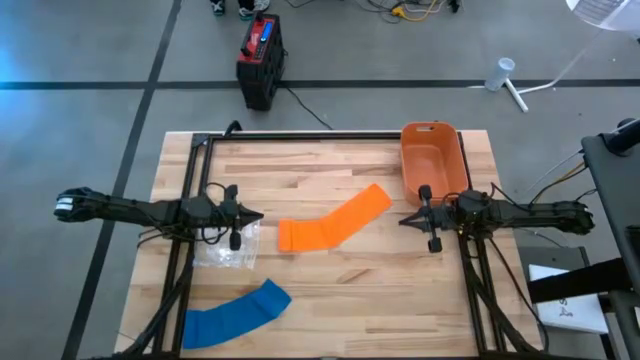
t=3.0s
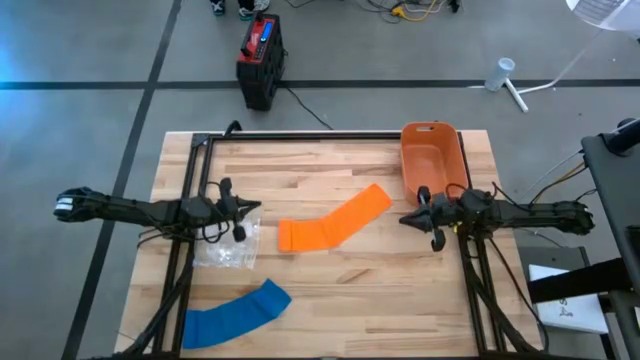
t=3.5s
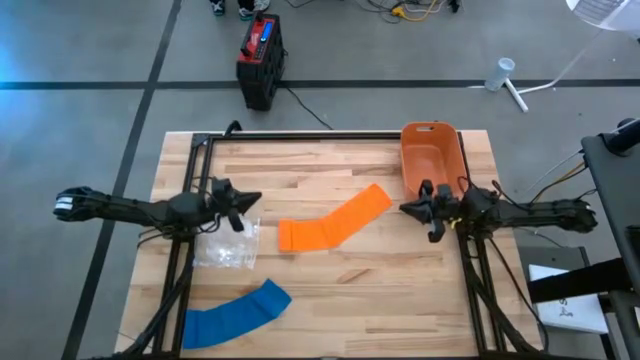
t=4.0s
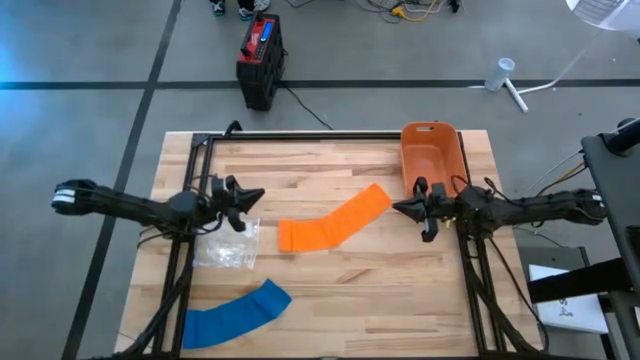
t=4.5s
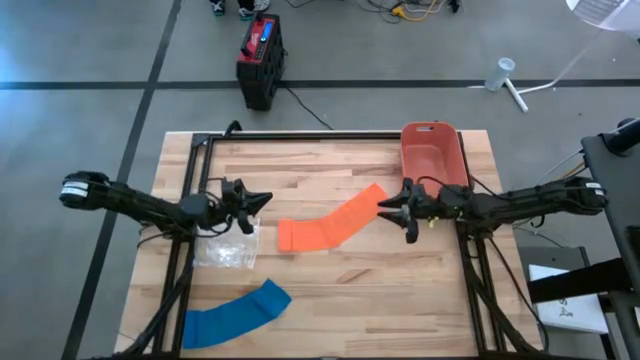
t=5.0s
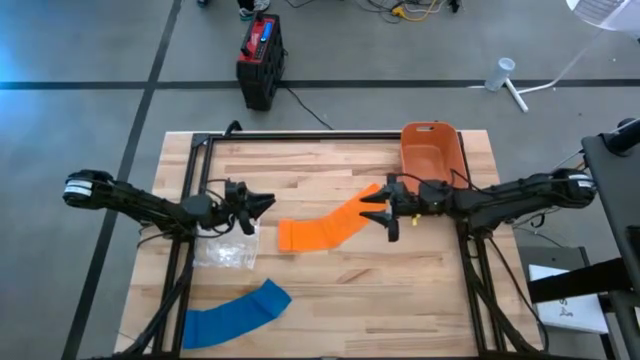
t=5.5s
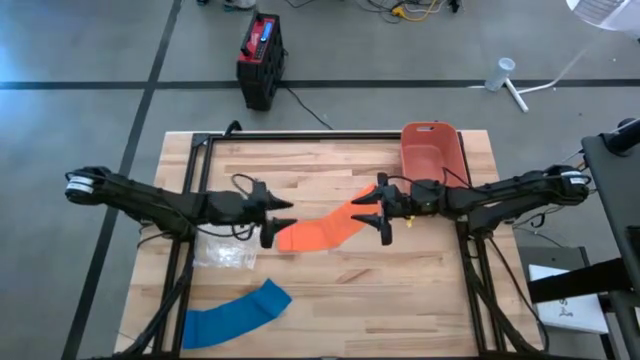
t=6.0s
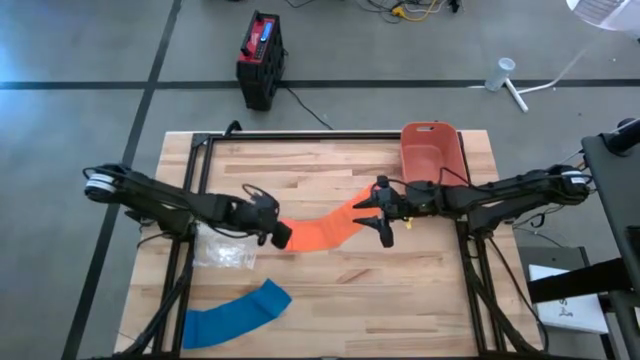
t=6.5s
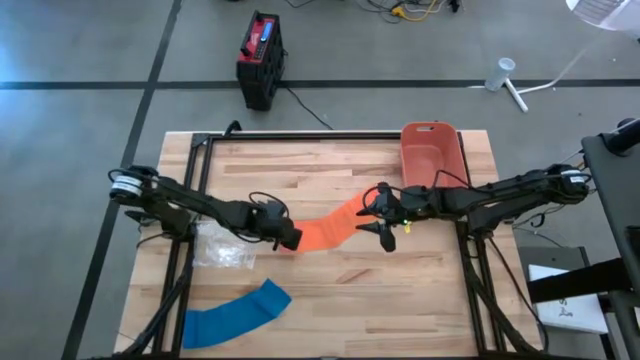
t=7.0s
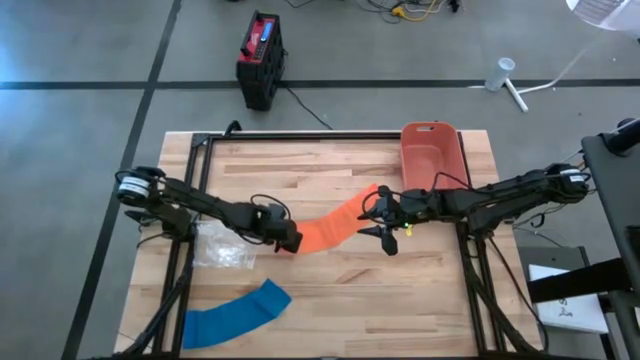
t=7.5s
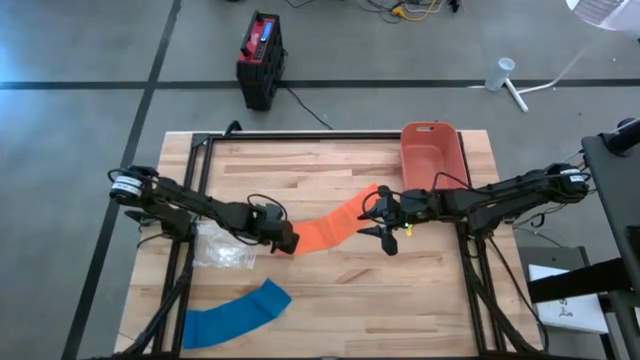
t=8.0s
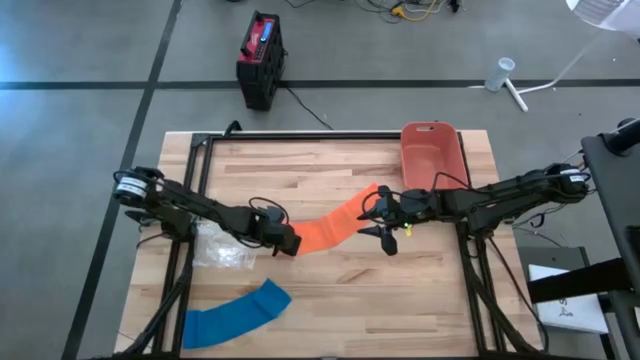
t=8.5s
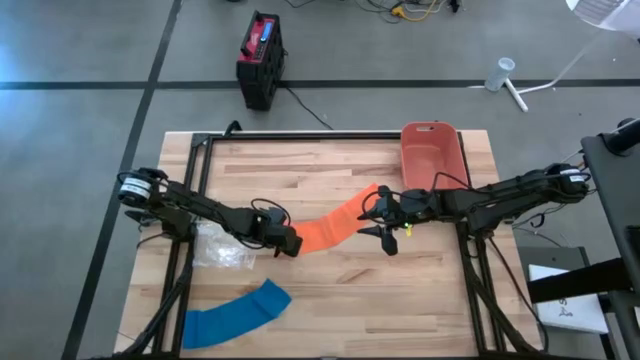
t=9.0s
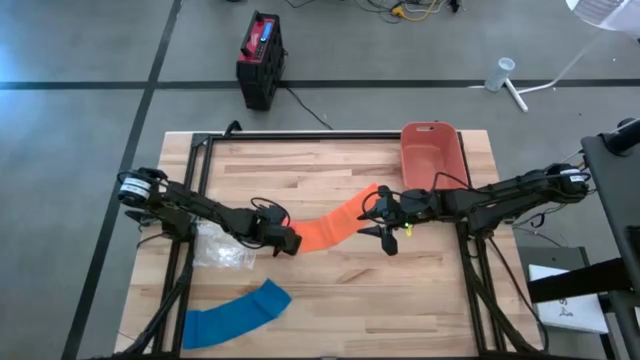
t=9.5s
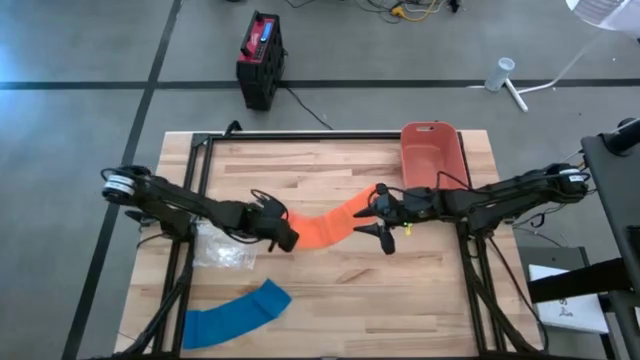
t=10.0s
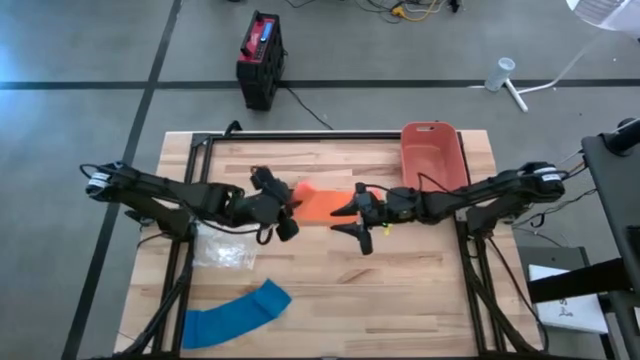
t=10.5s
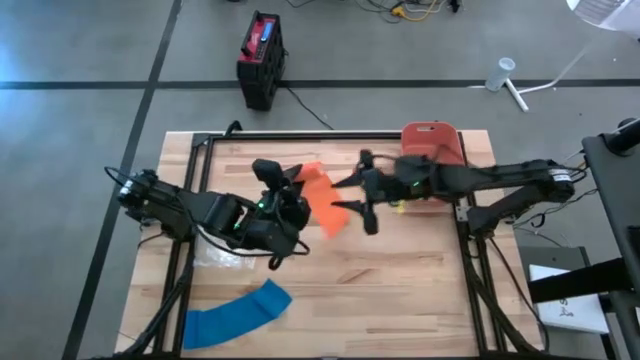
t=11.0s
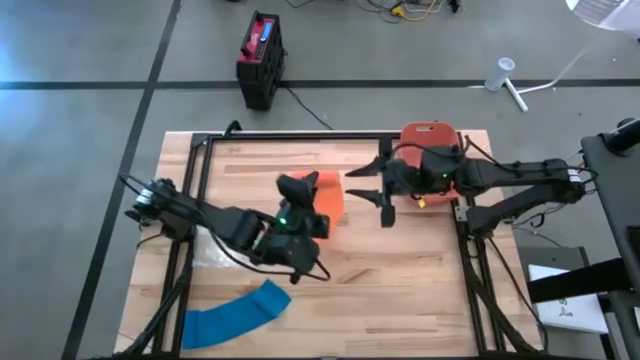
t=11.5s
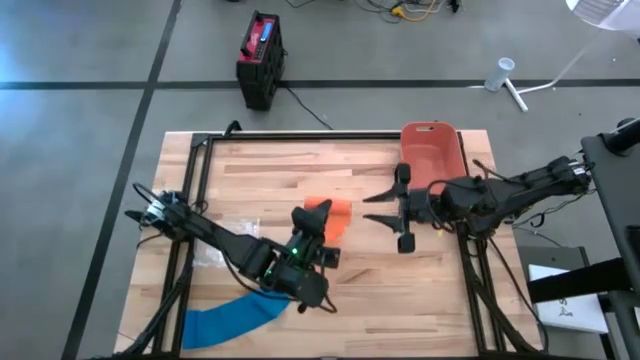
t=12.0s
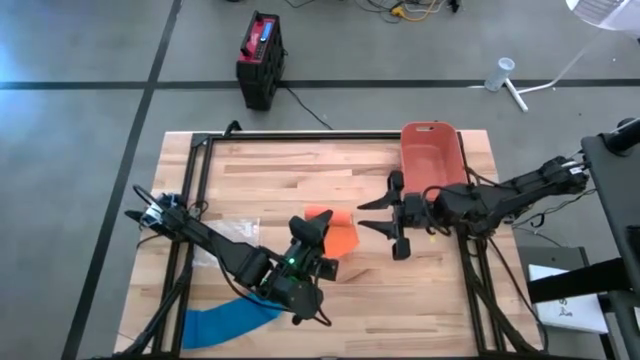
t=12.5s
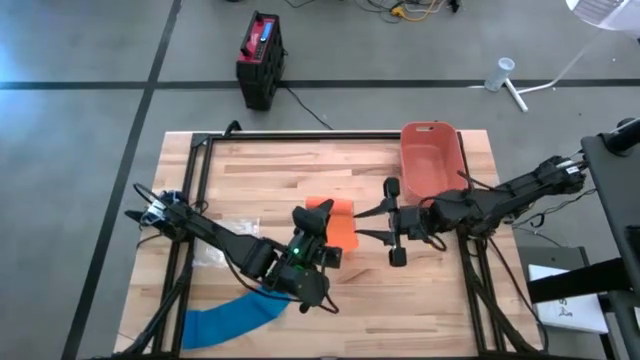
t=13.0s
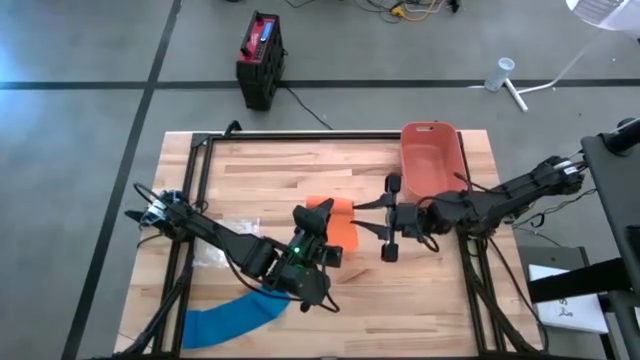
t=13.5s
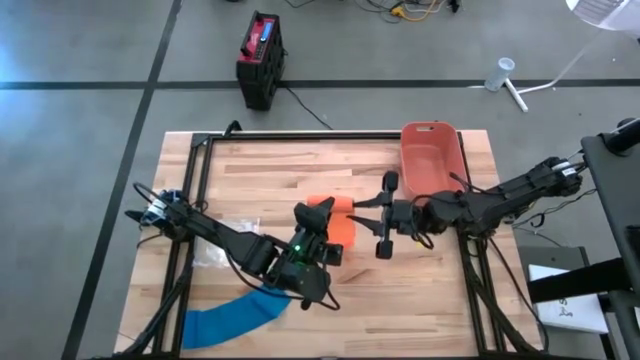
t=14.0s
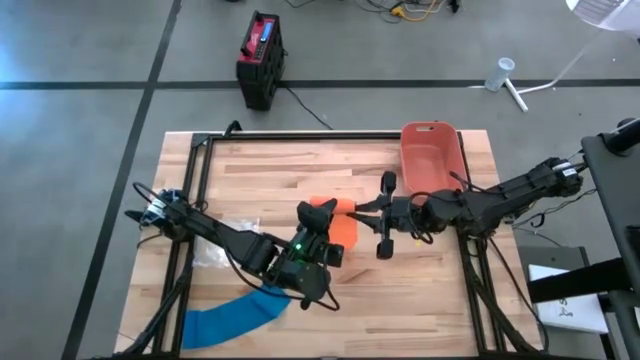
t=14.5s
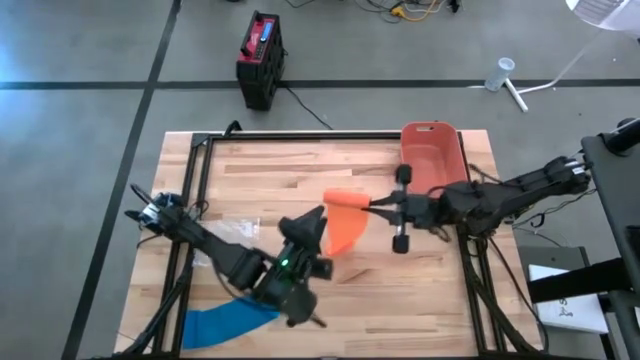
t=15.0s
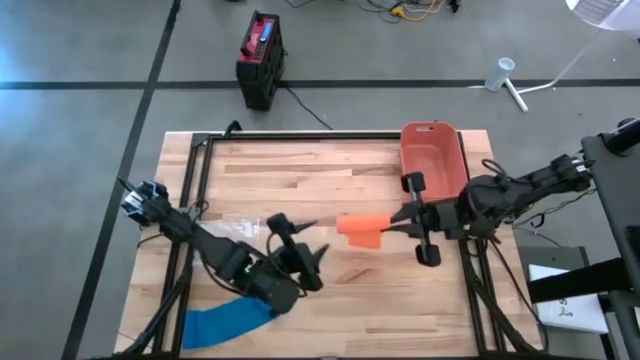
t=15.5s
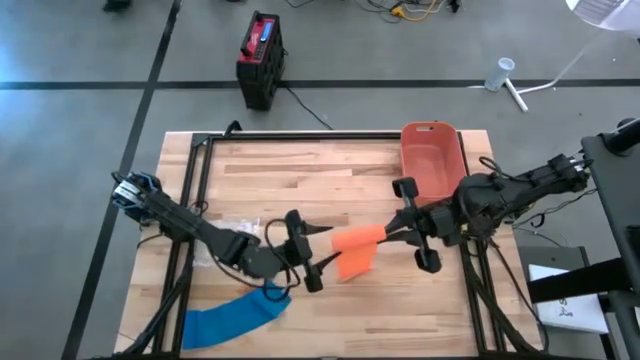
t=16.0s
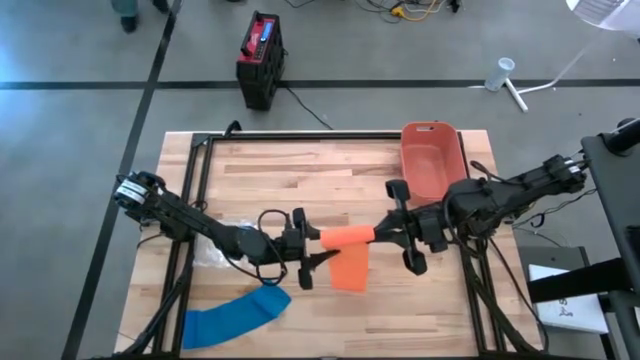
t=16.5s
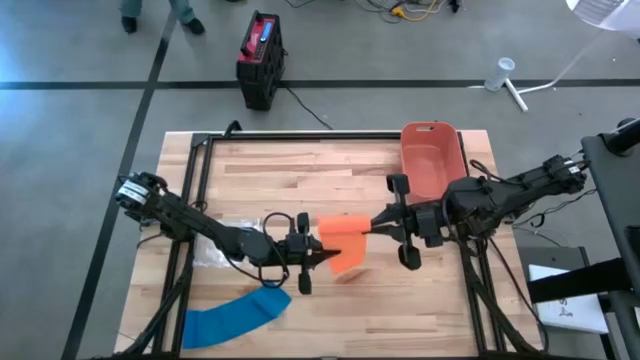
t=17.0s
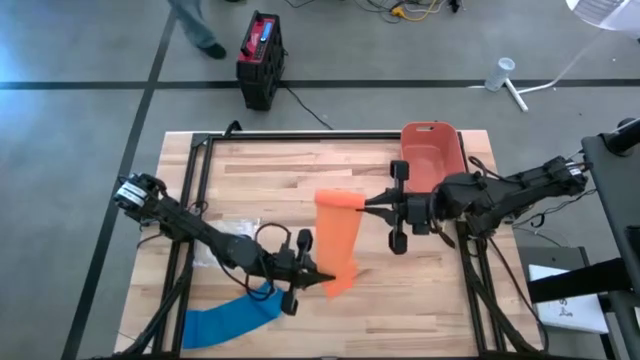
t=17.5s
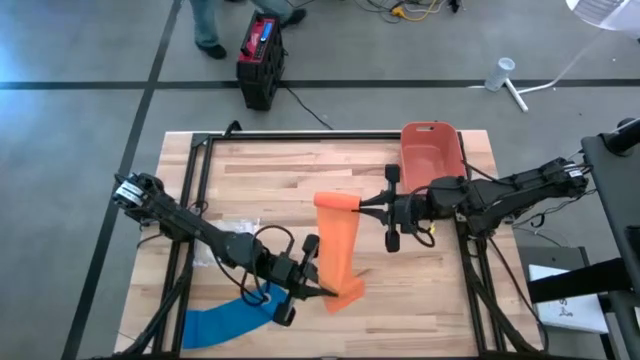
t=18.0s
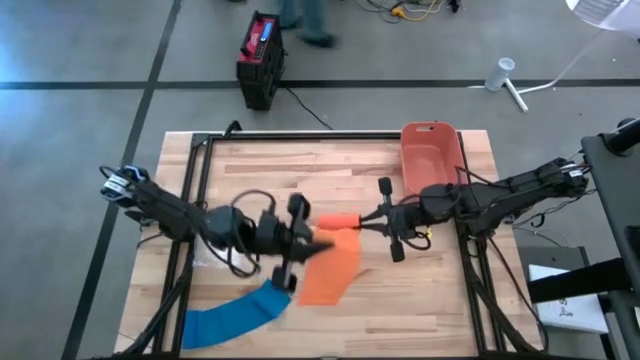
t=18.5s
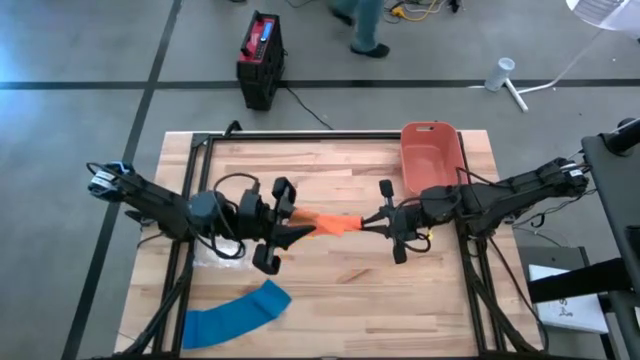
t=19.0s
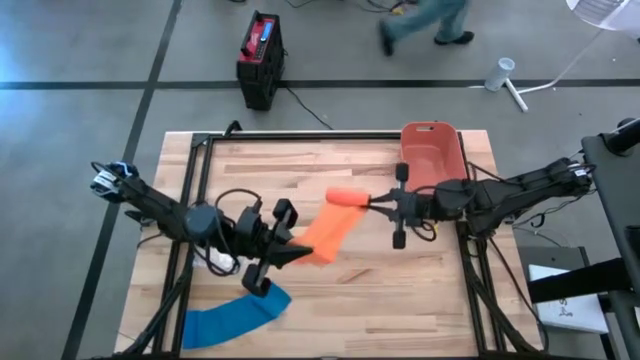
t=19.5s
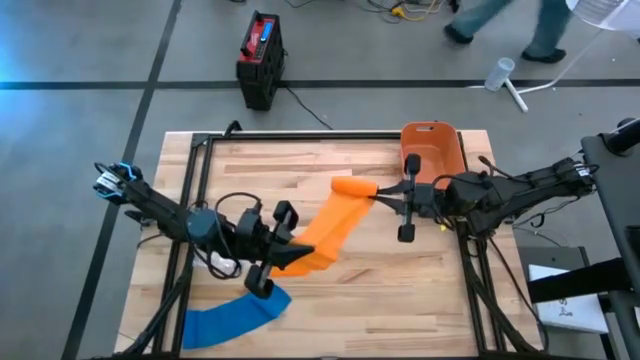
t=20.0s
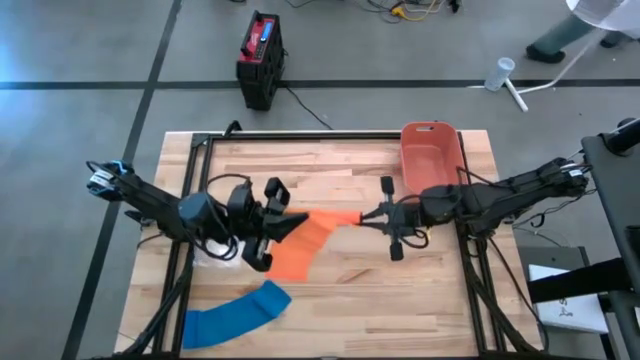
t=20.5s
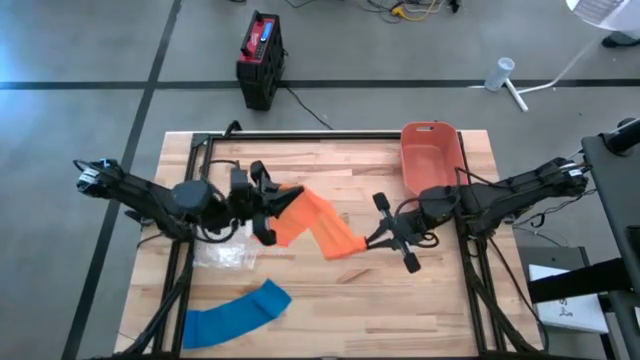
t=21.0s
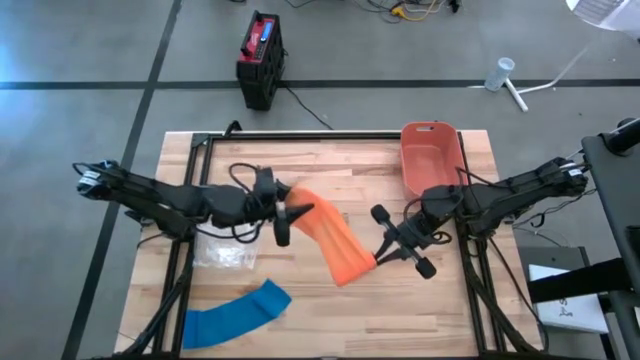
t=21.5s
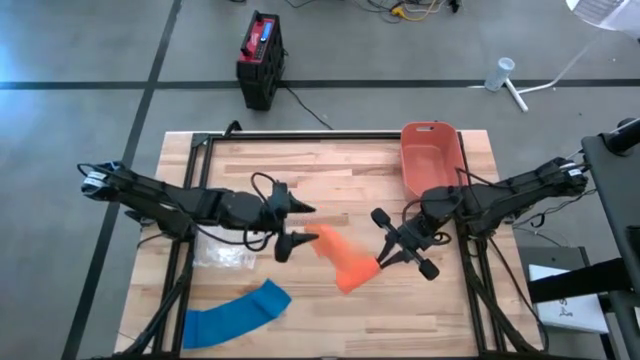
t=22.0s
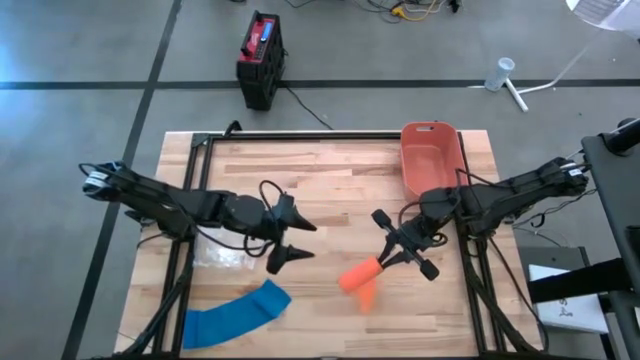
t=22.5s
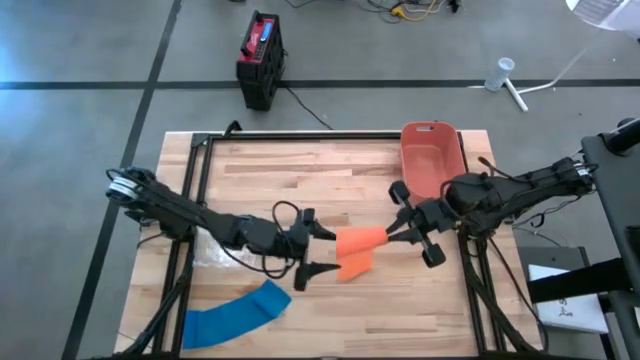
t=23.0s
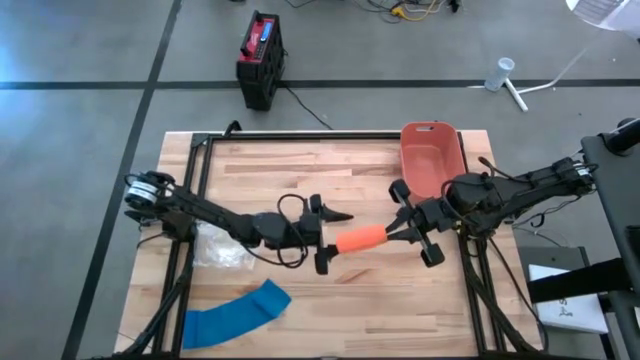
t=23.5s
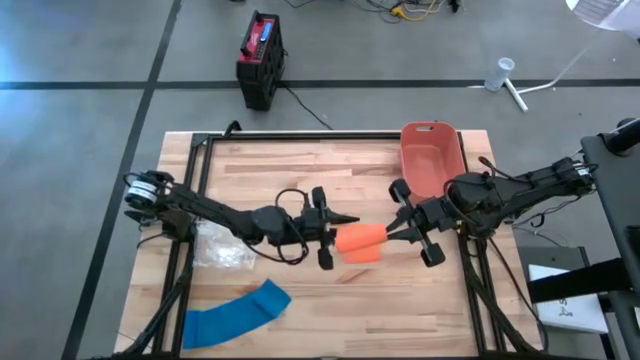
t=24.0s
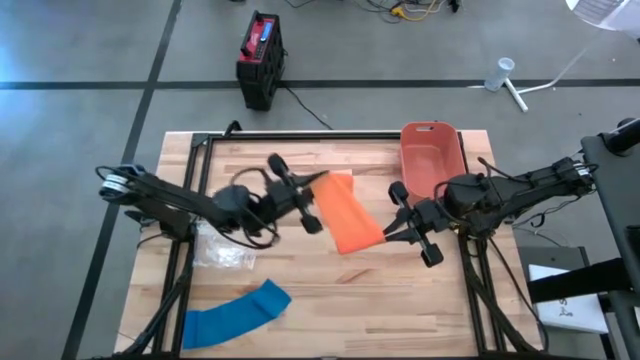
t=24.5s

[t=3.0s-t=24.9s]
Task: Roll bandage
Roll the orange bandage
